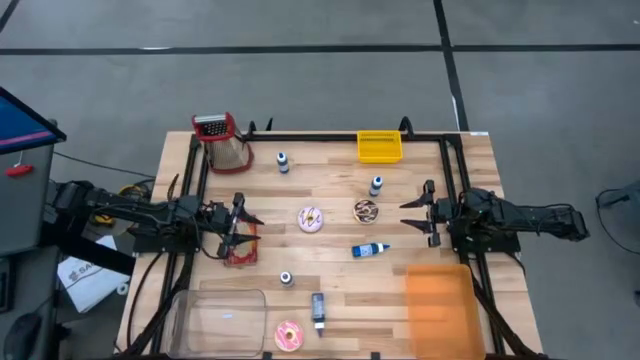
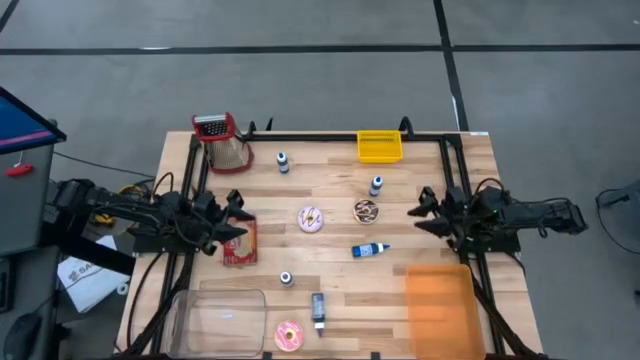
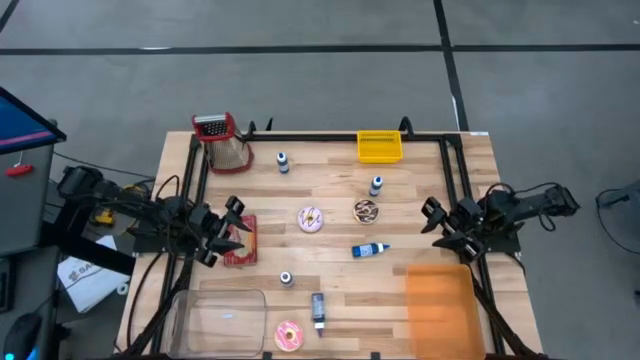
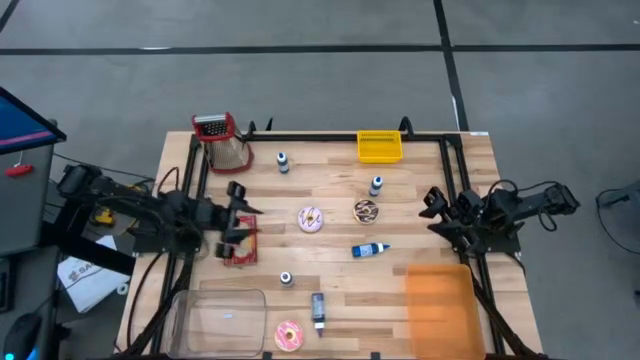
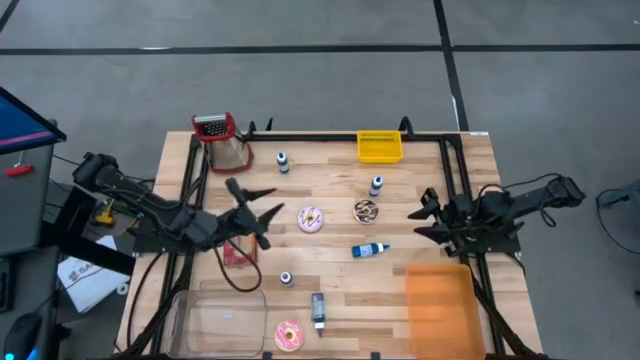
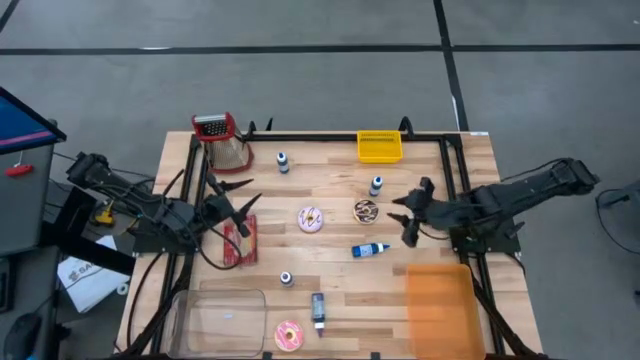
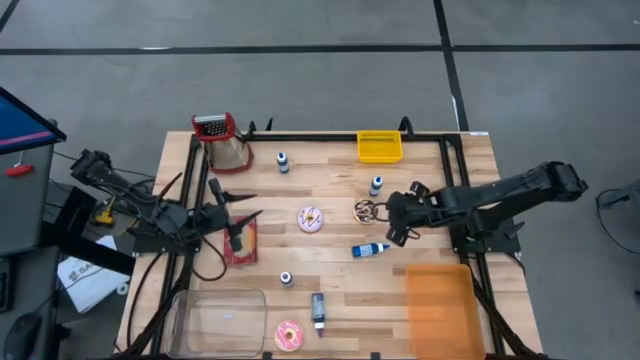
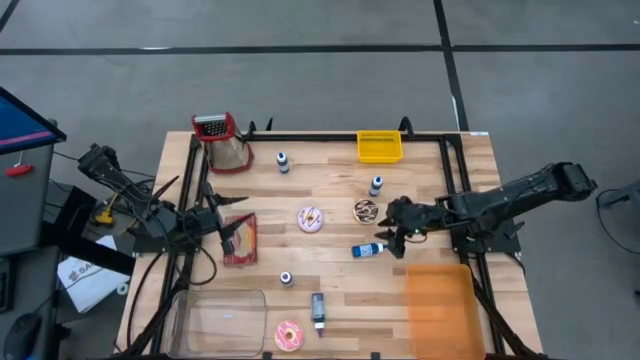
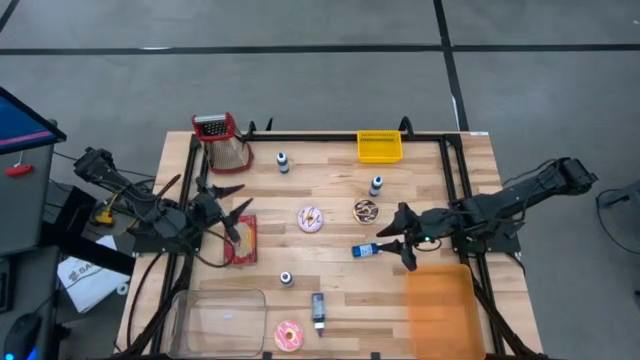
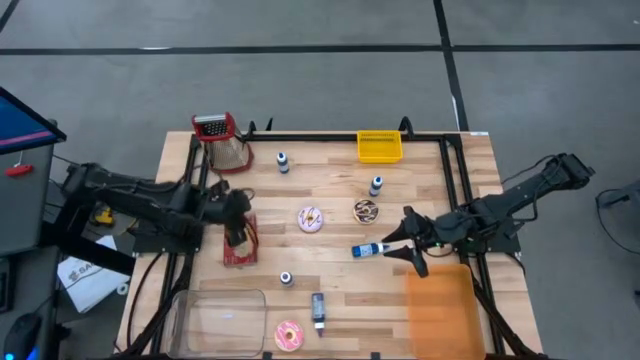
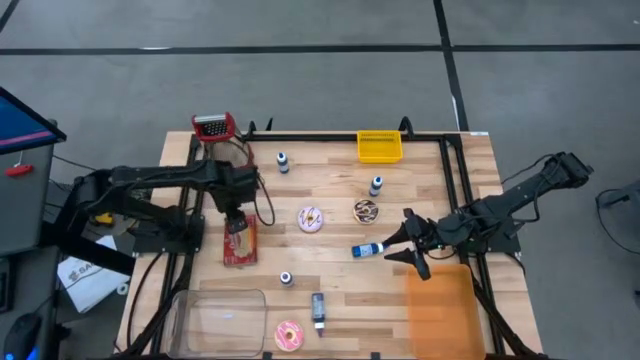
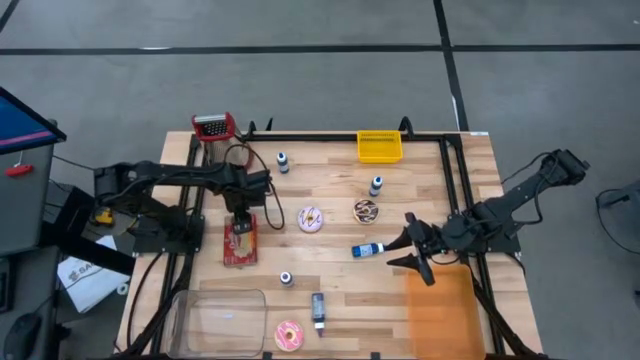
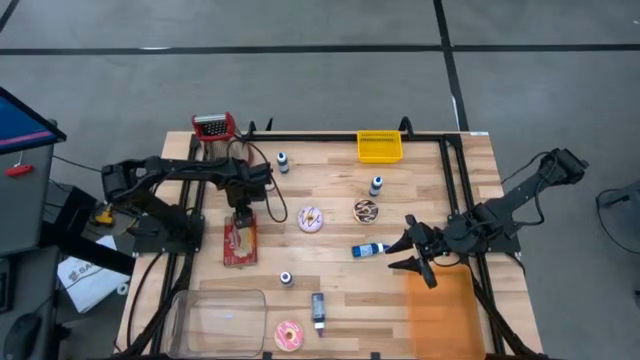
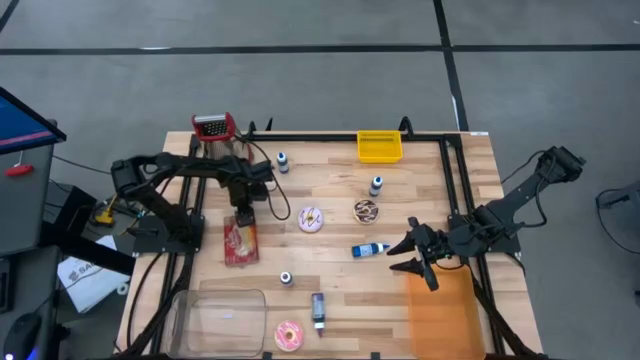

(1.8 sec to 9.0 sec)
Put the red popcorn bag into the orange bin

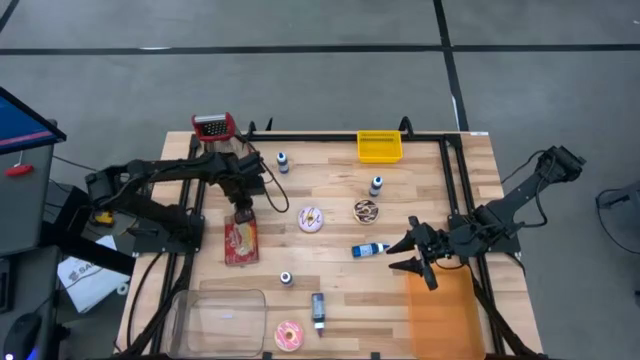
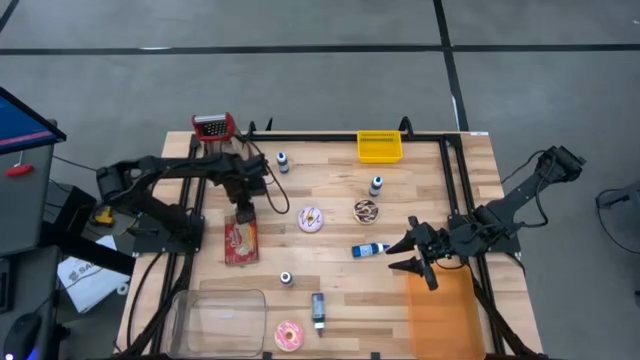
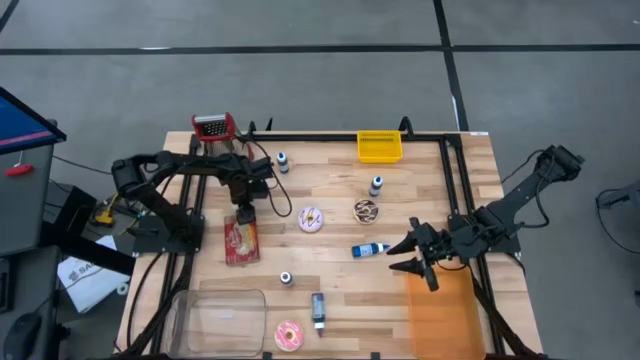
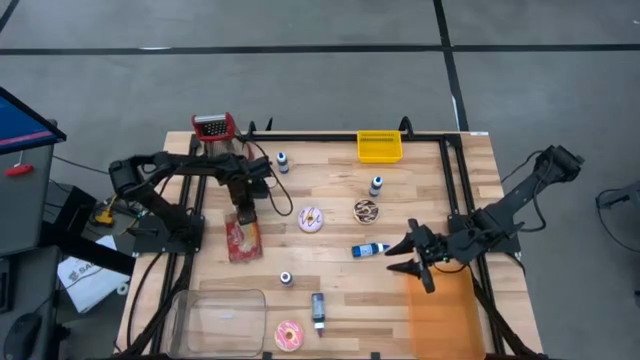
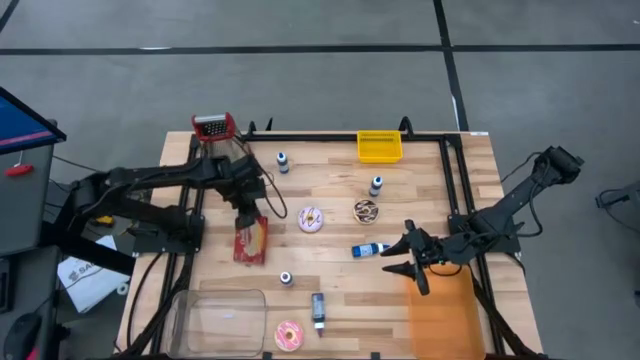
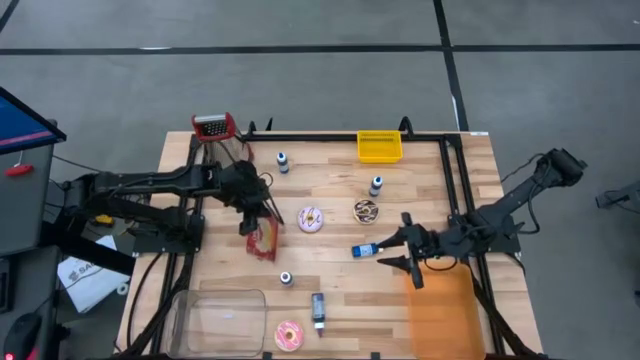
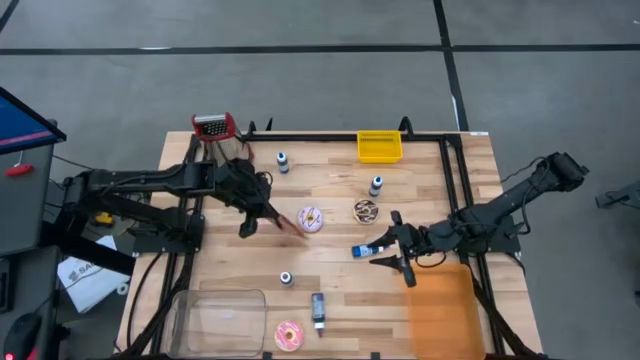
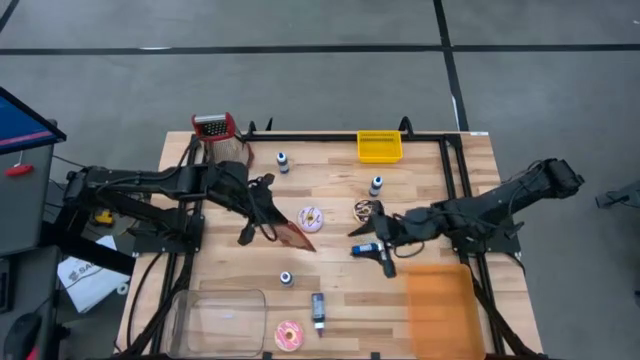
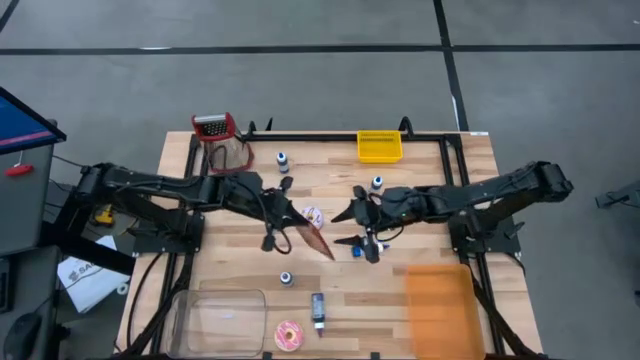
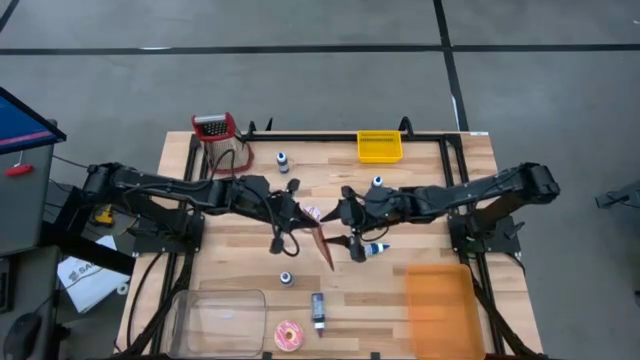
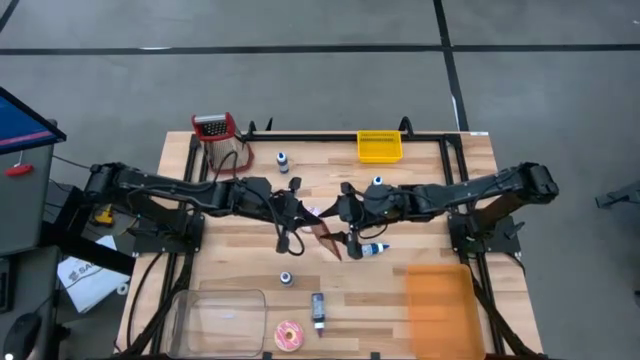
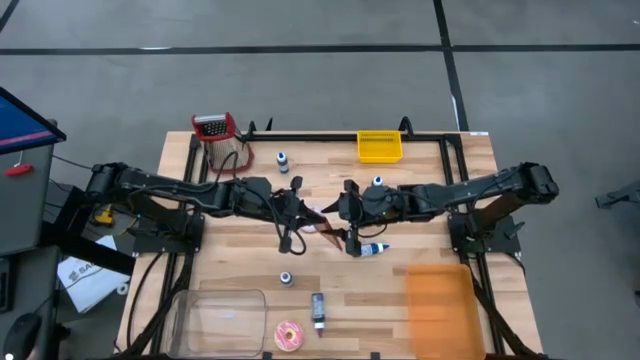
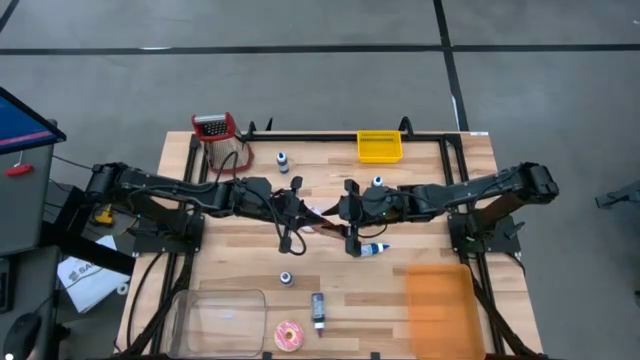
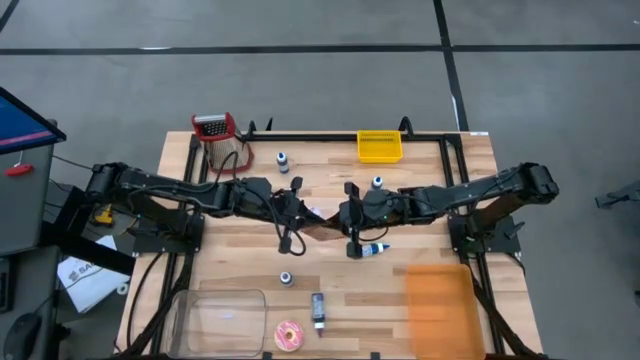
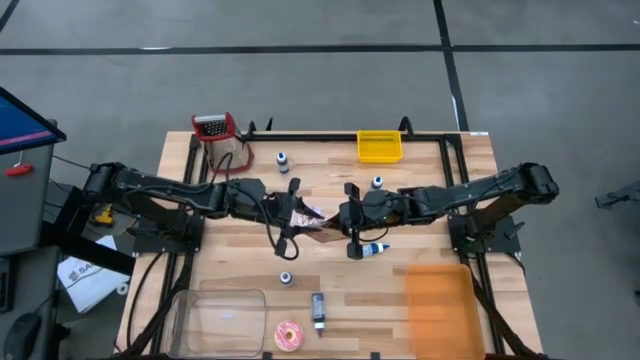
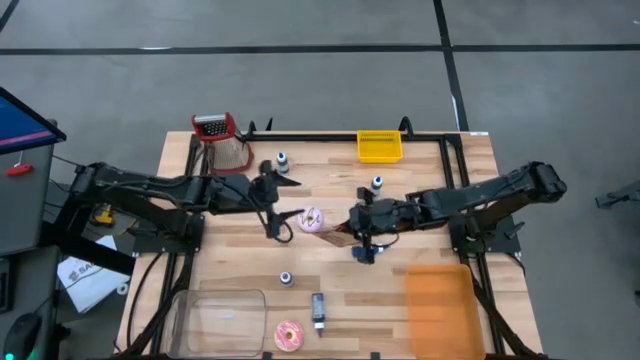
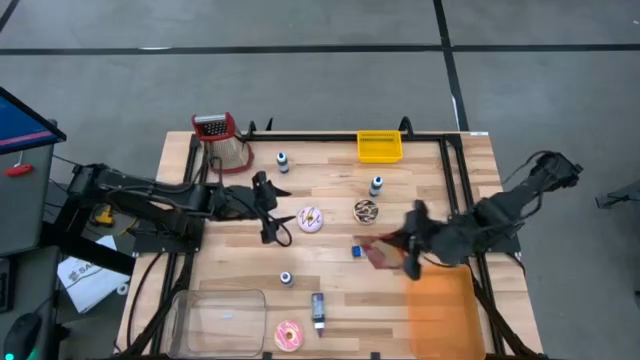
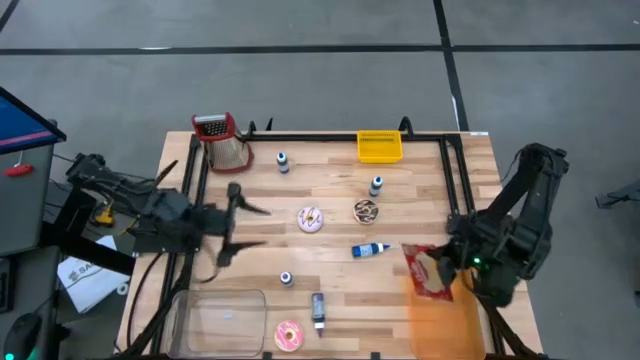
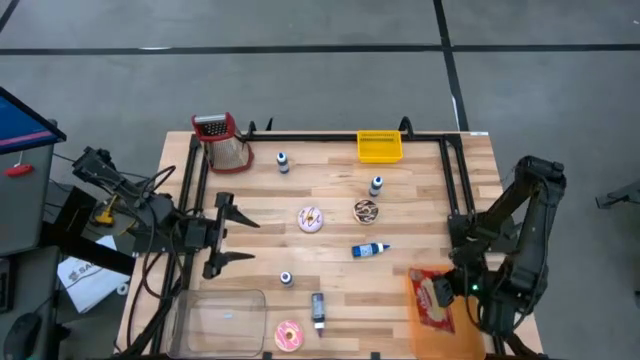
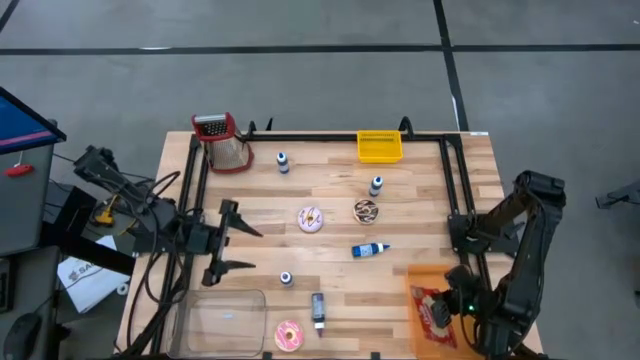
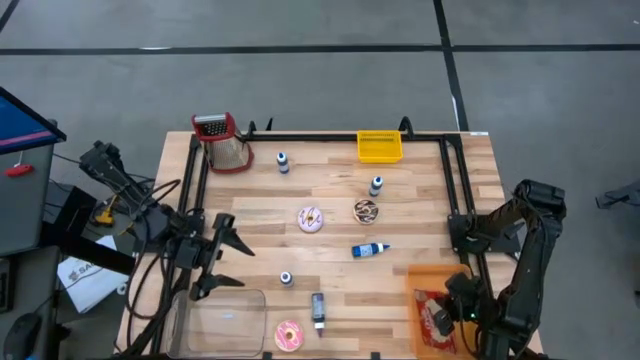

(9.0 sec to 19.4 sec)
Put the red popcorn bag into the orange bin
